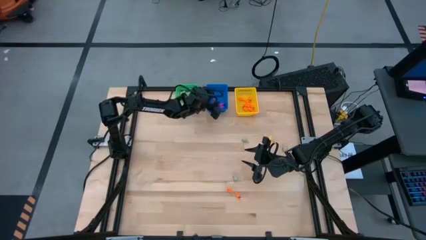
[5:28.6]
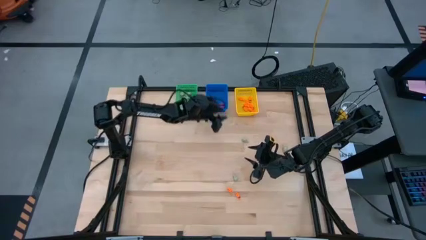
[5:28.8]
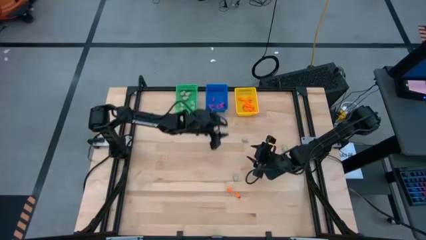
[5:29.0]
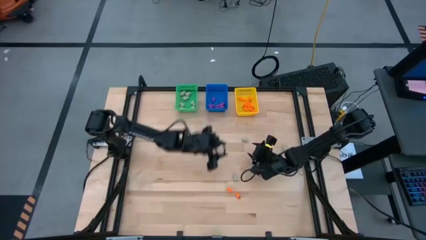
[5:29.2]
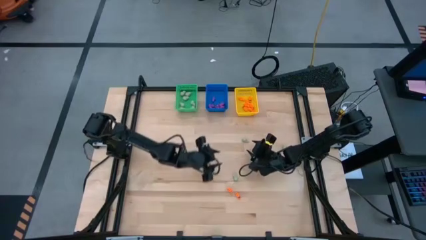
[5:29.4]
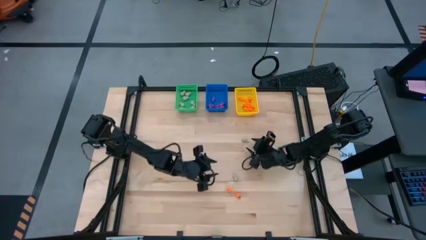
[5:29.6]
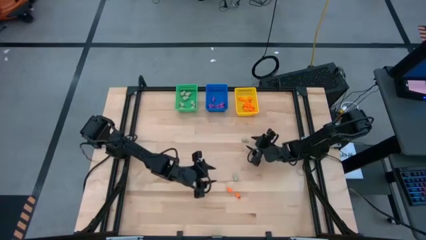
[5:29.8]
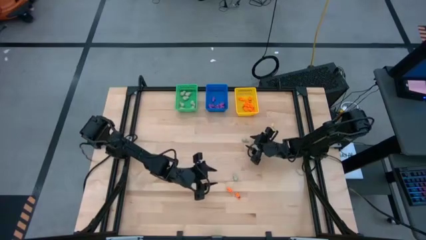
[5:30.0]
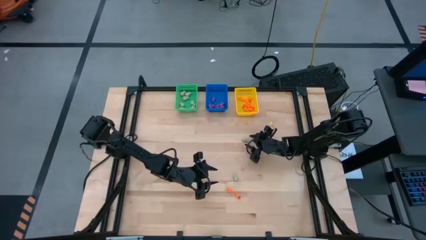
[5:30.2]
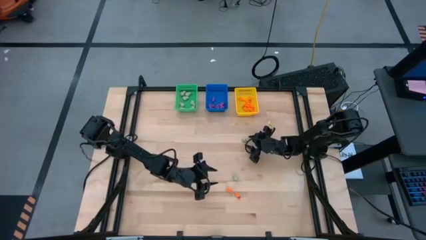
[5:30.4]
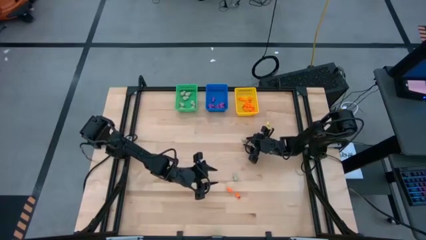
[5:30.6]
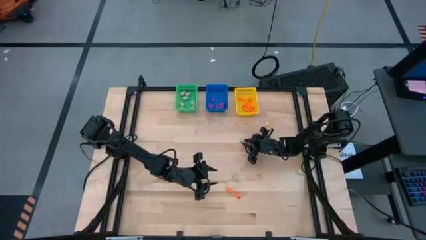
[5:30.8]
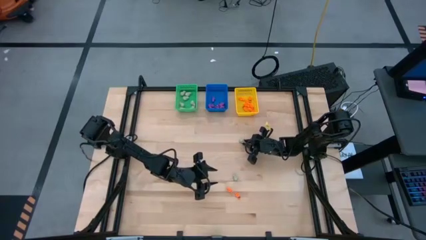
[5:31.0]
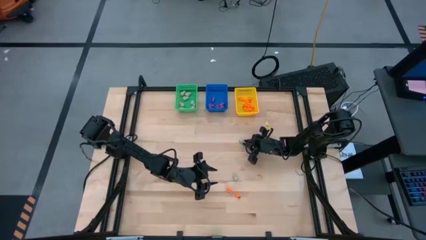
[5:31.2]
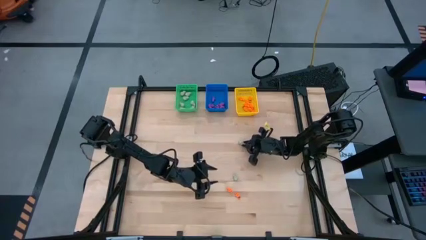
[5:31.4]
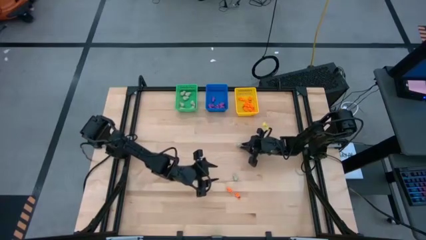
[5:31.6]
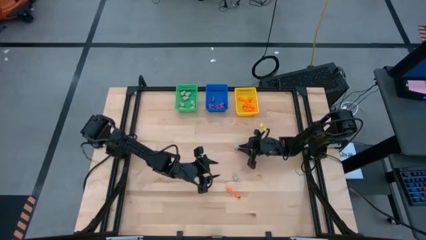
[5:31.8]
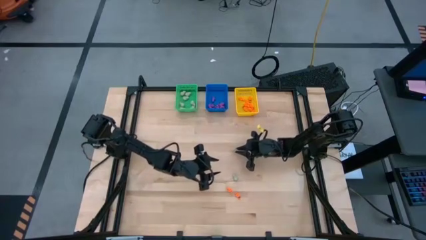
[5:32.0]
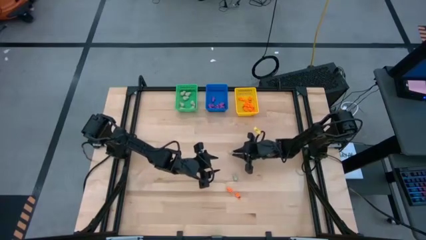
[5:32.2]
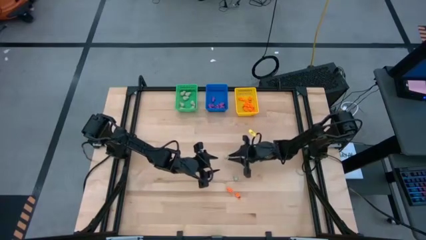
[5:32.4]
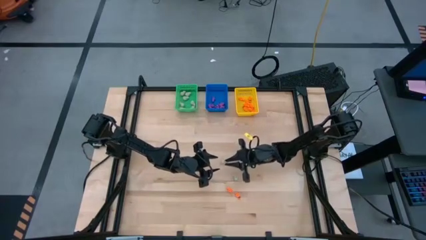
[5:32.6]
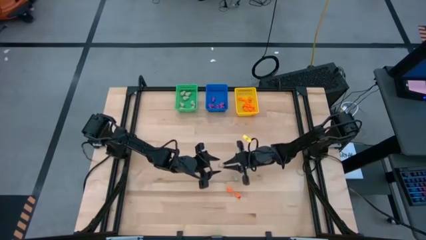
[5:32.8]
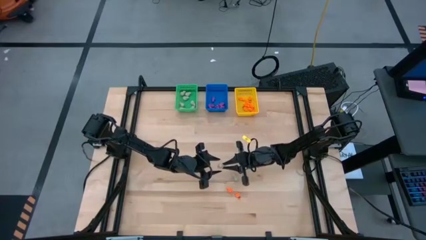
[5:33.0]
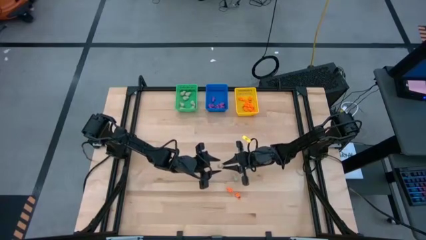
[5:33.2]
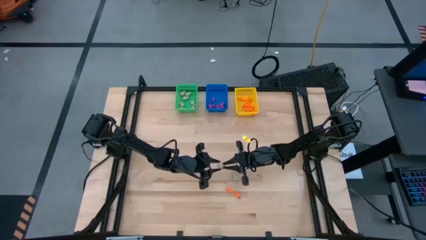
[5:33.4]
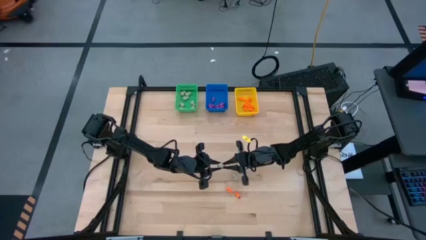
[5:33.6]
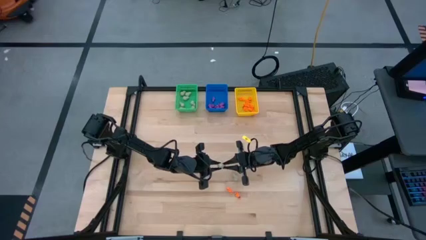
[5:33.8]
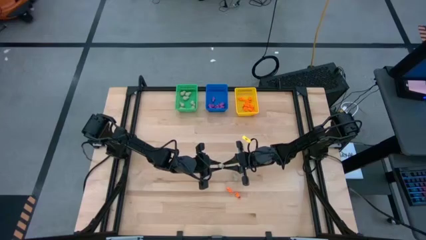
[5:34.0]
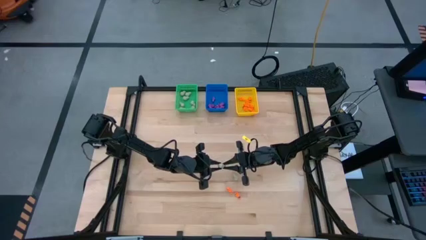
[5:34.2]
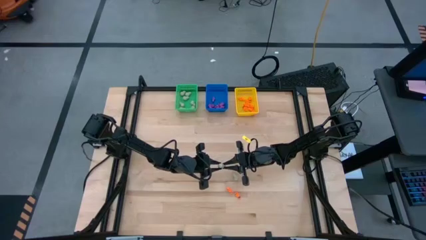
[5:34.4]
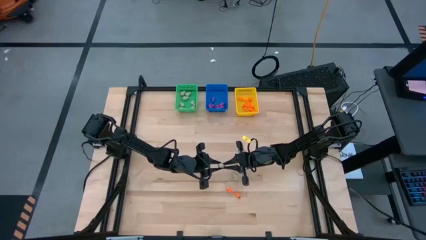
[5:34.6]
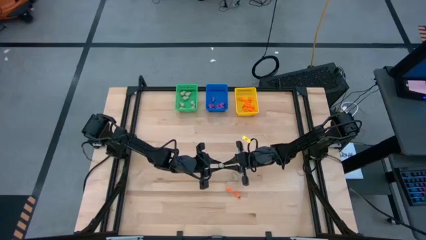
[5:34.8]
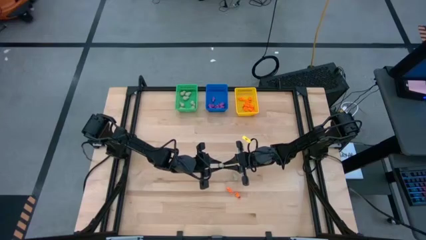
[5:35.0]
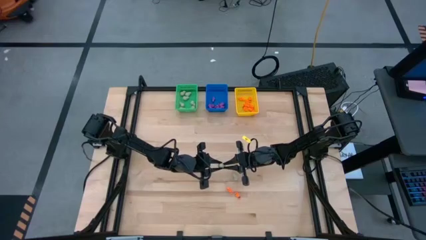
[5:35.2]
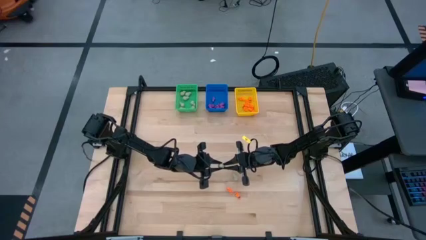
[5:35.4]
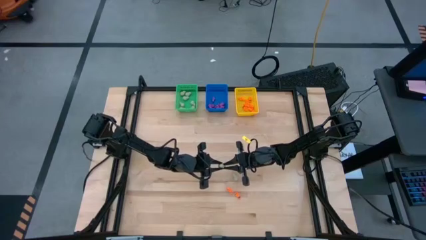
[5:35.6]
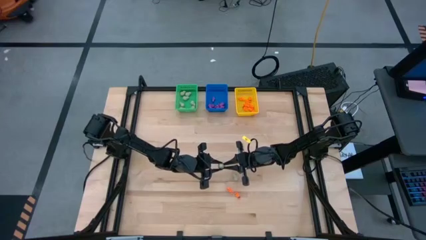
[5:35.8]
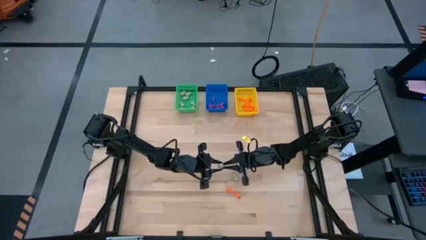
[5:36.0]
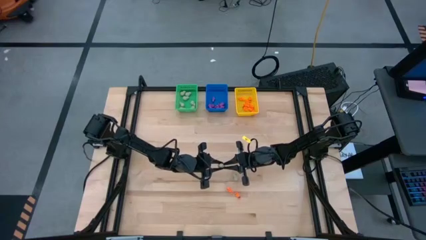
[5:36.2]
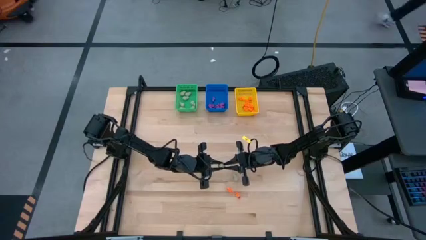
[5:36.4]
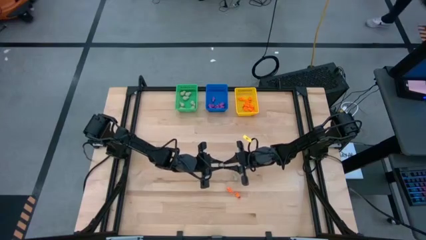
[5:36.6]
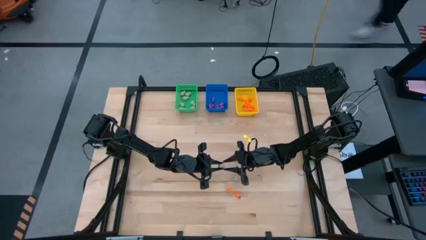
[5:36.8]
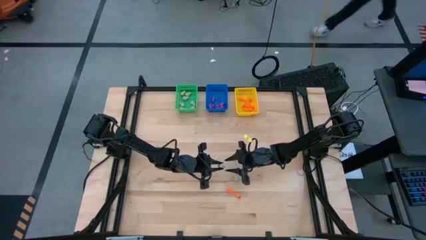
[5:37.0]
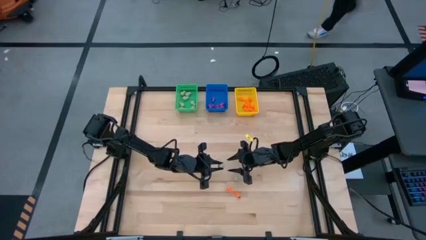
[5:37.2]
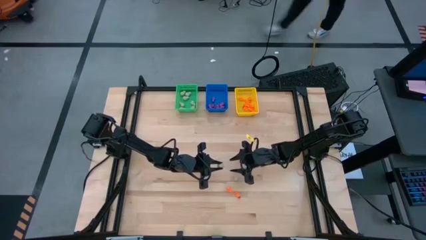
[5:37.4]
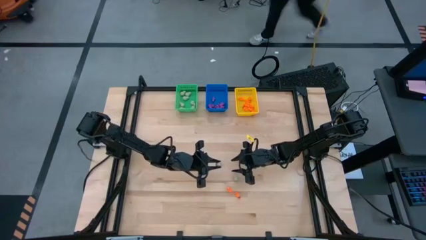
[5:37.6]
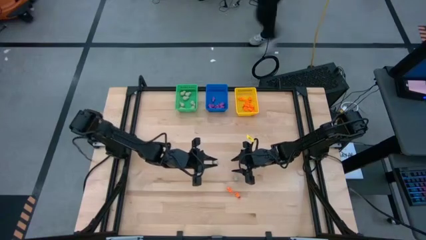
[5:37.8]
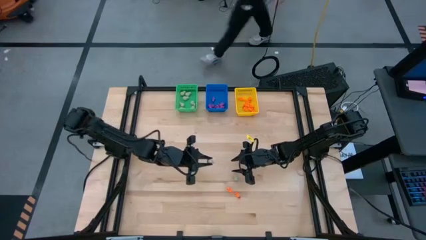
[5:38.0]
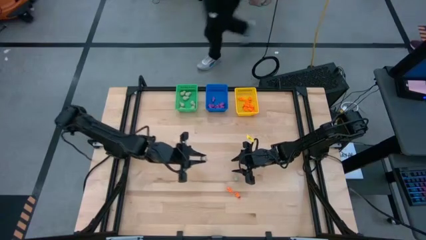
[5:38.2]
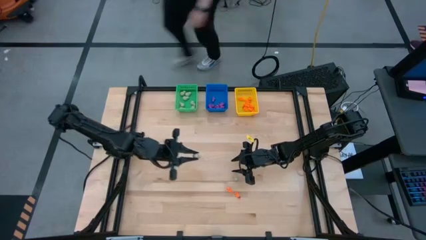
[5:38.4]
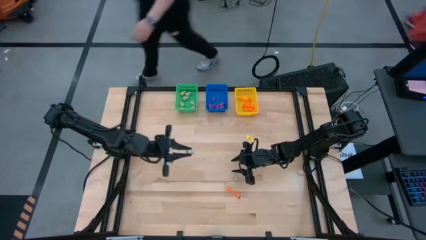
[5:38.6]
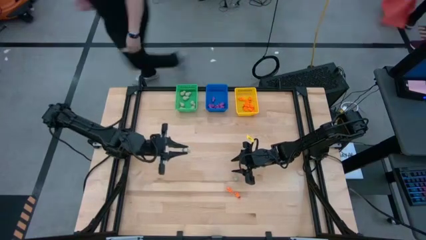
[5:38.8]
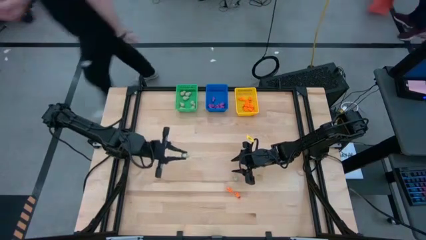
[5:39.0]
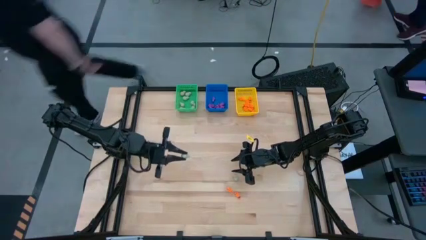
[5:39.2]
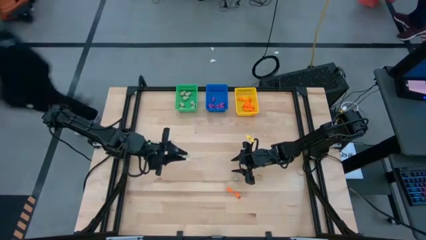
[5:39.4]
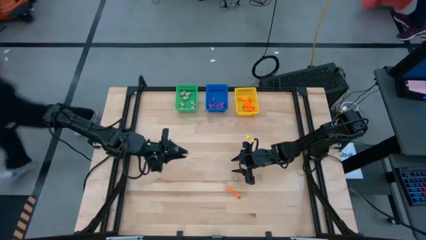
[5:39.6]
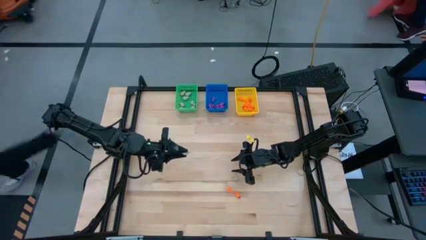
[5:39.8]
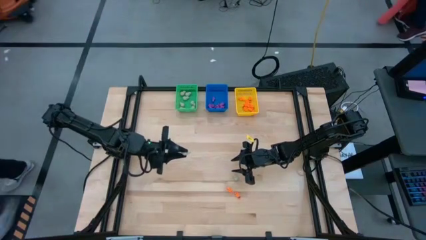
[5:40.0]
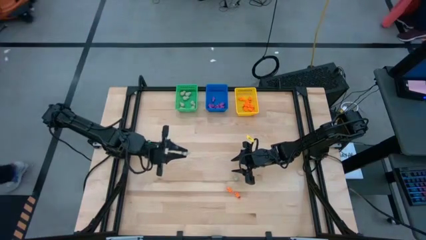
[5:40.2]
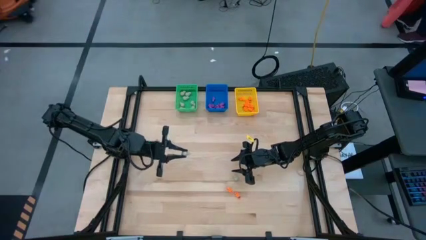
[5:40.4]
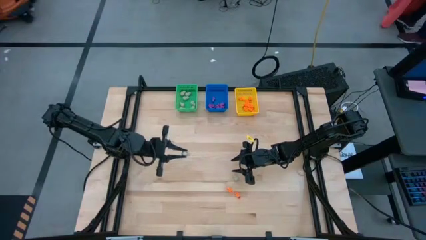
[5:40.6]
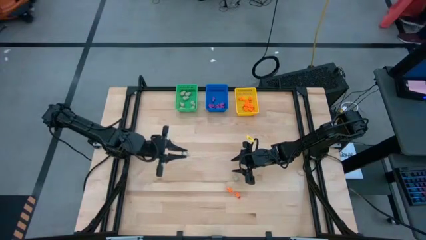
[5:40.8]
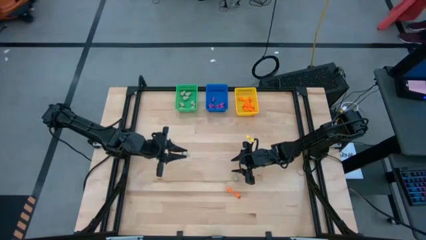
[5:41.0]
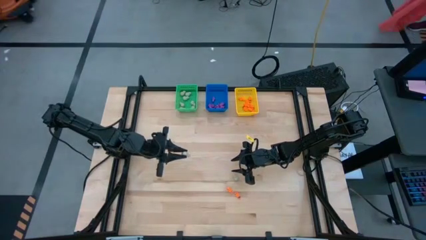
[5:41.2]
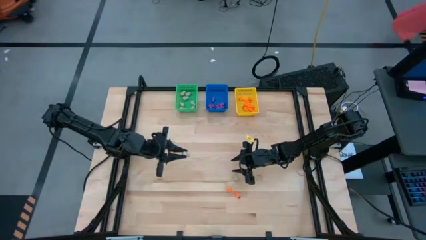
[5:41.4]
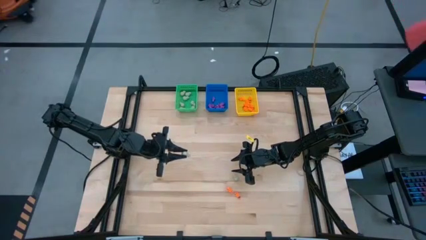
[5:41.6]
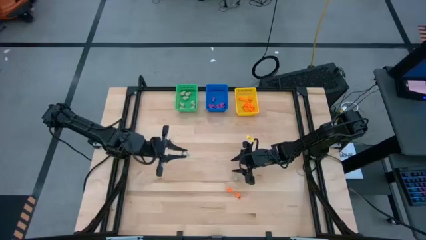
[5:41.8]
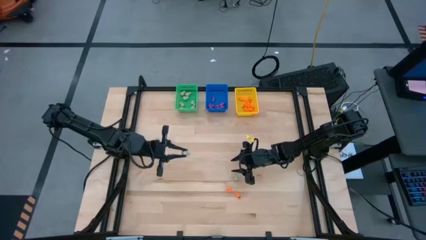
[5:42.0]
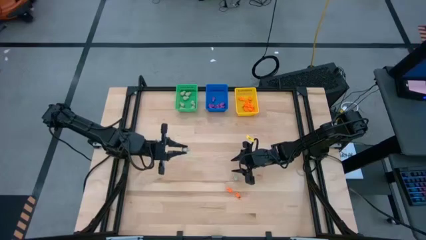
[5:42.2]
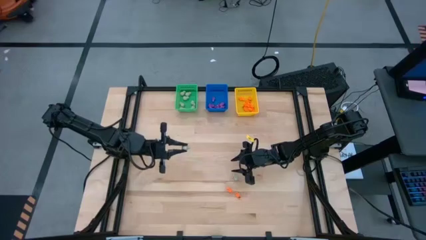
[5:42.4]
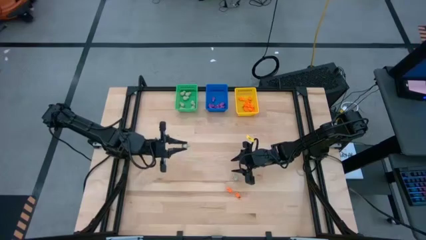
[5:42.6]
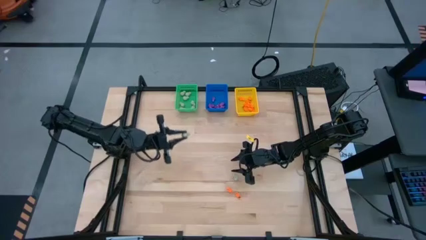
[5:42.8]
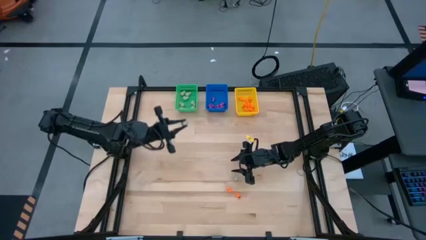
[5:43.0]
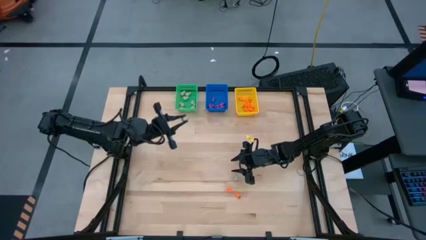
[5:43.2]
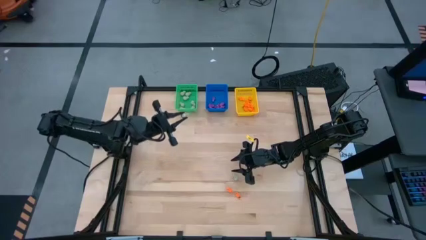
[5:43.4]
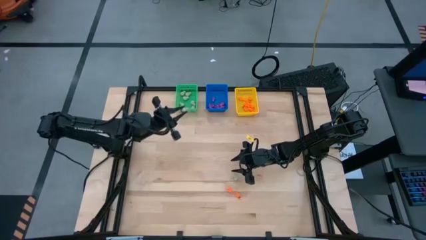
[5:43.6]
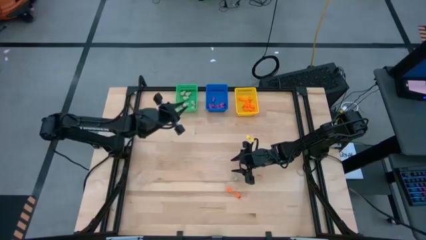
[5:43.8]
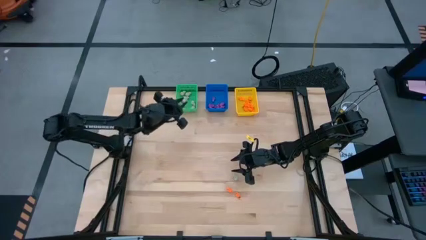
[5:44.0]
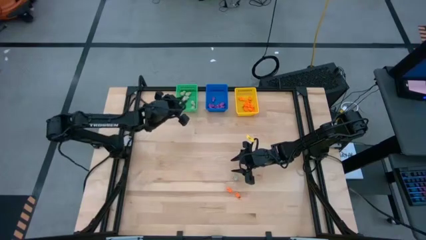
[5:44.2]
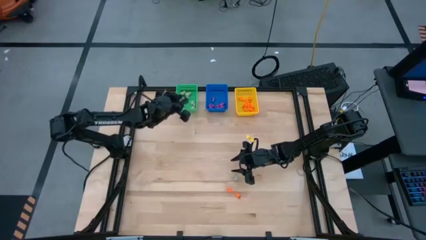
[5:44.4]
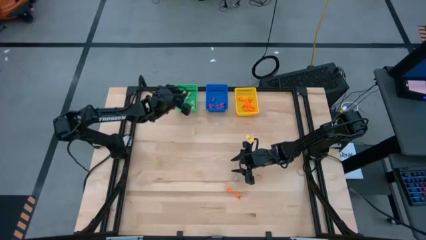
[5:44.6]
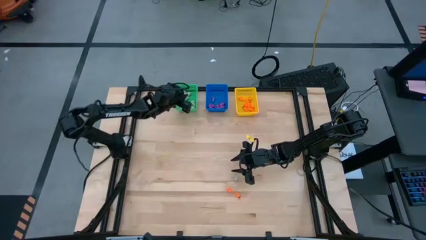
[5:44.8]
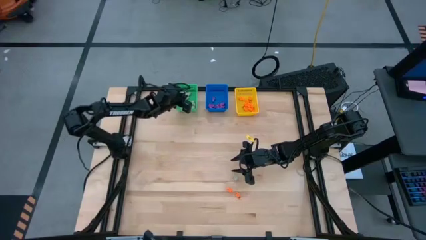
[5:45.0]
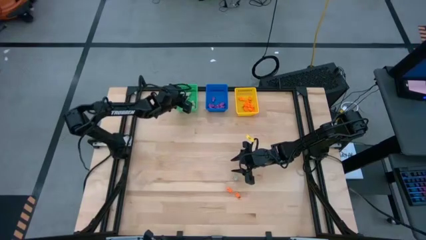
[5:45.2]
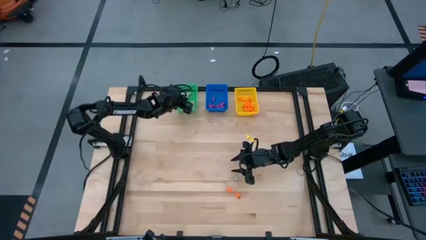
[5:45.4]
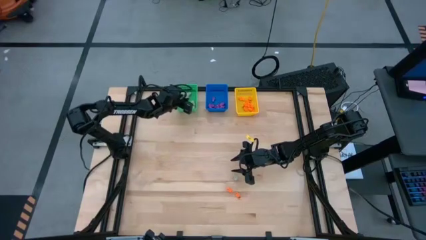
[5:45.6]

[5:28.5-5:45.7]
Task: Sort Halloween decoration
Put the gray skull toy into the green bin

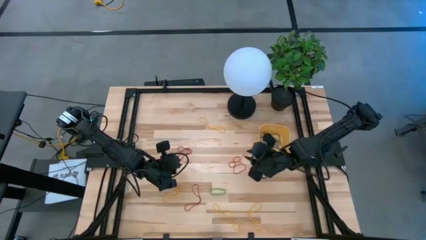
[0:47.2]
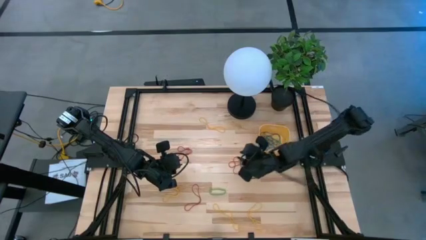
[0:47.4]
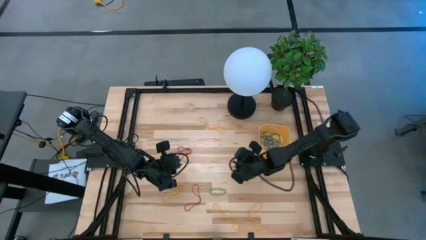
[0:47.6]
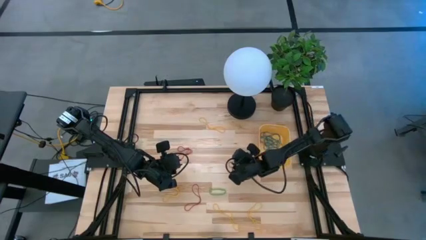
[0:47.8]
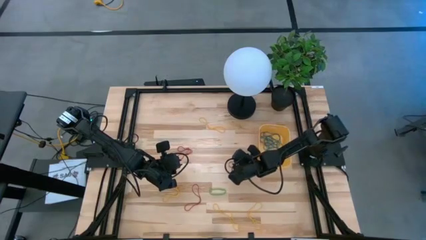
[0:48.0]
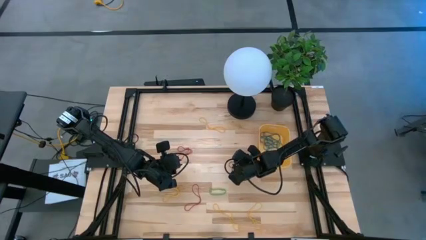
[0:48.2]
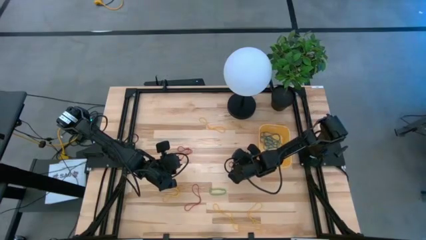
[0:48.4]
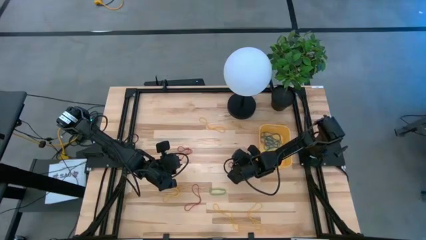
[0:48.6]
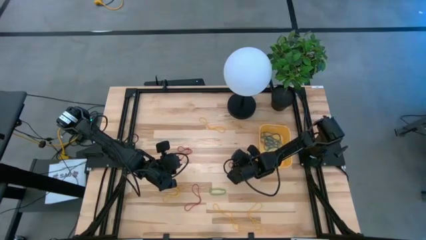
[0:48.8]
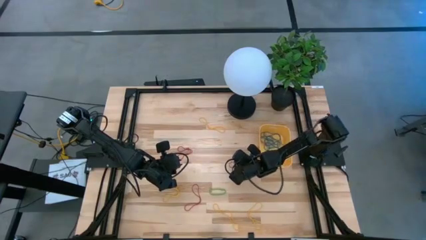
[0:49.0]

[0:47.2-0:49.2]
Task: Pick and place items into bin
Put the red rubber band into the bin
